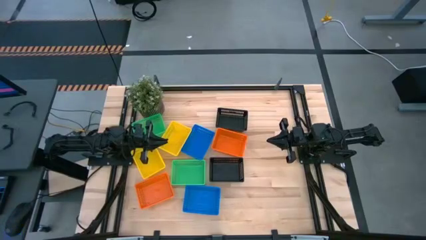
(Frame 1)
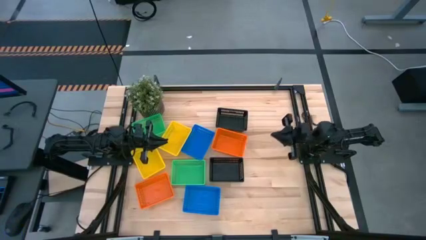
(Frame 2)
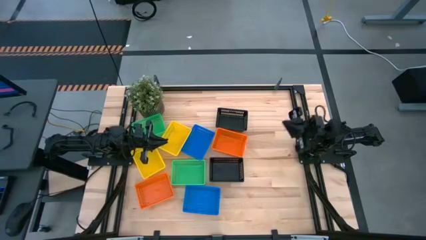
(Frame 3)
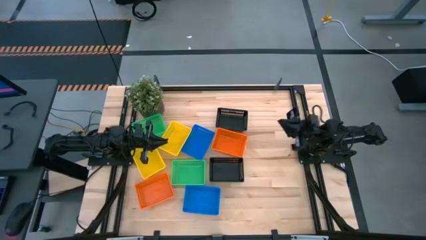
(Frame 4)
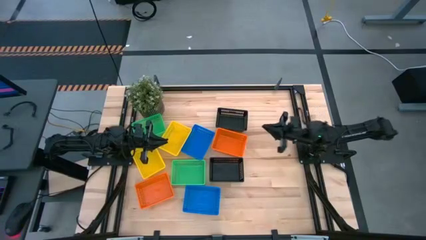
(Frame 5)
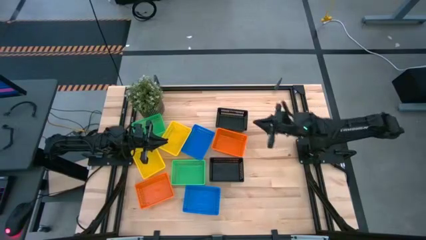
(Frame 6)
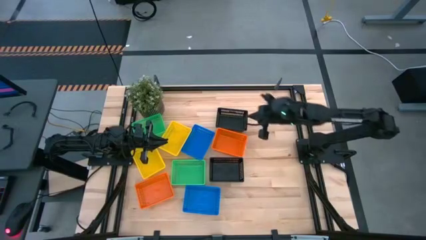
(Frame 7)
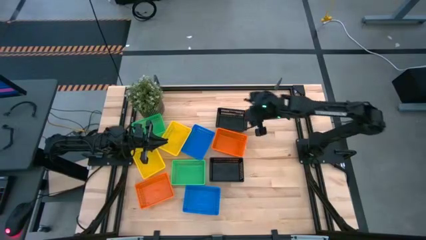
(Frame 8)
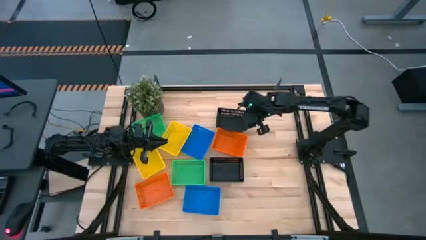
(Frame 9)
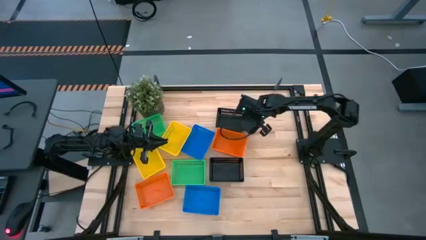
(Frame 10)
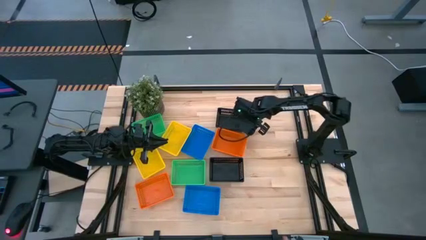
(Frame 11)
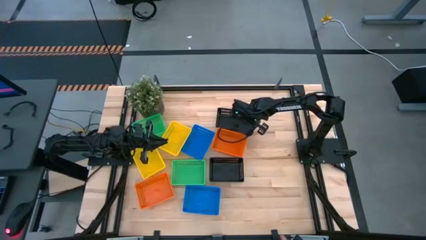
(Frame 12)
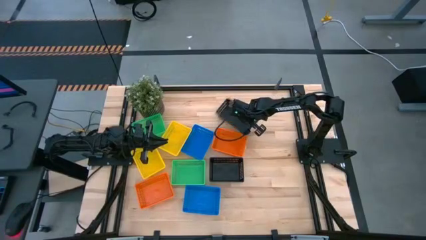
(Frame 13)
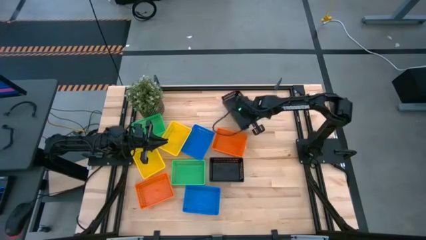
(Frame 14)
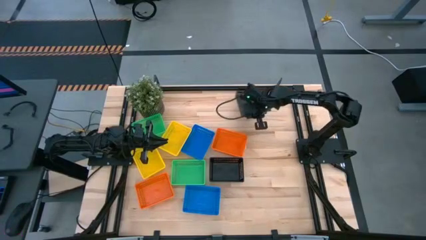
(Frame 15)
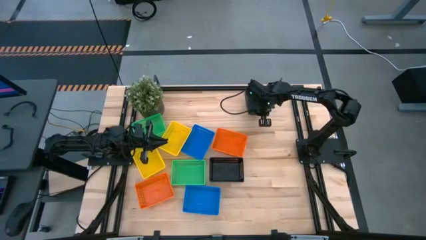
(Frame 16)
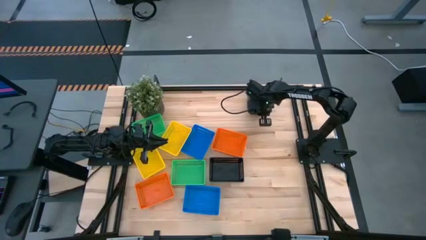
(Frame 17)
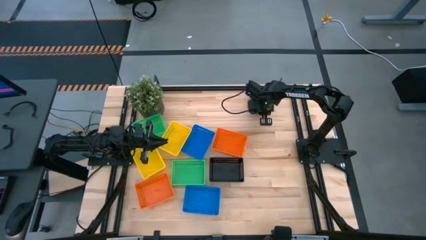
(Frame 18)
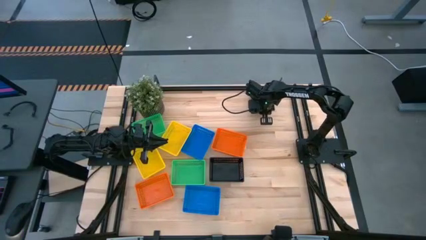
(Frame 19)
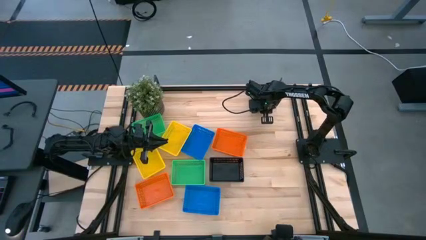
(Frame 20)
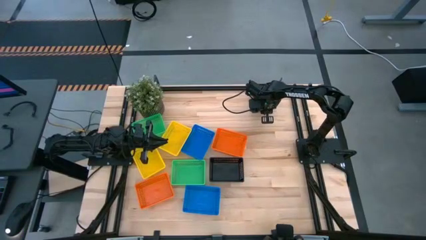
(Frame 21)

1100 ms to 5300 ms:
Move the top black bin to the top right of the table

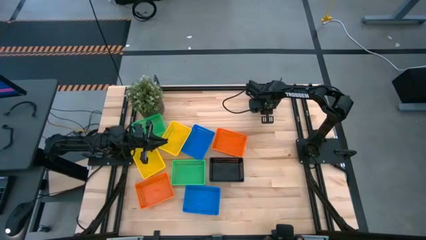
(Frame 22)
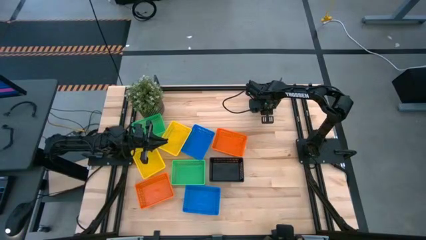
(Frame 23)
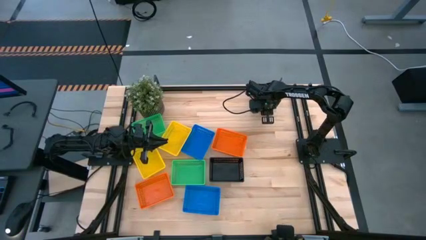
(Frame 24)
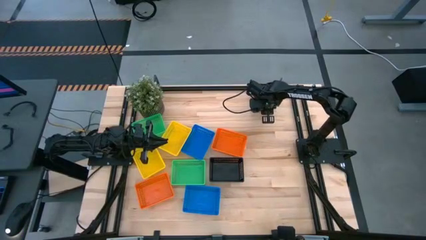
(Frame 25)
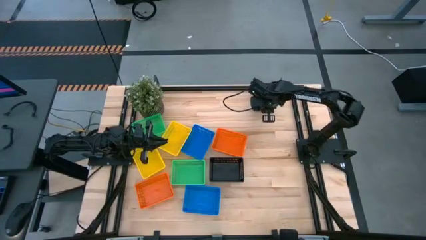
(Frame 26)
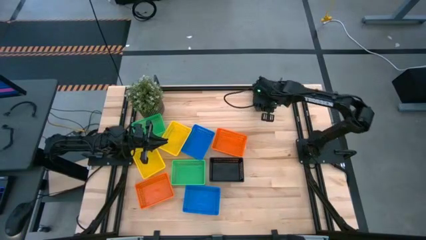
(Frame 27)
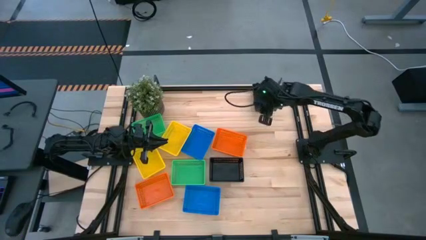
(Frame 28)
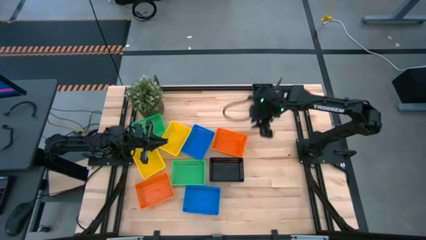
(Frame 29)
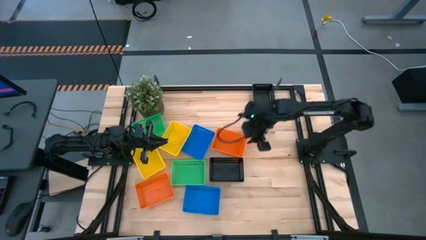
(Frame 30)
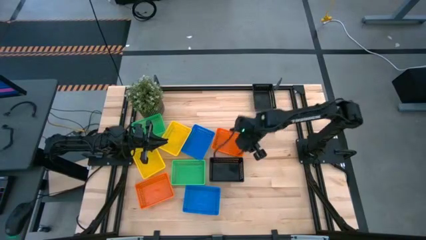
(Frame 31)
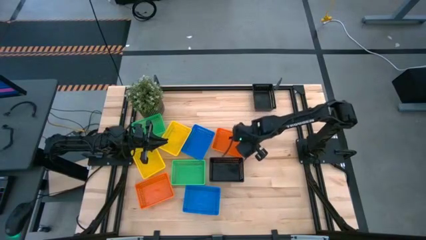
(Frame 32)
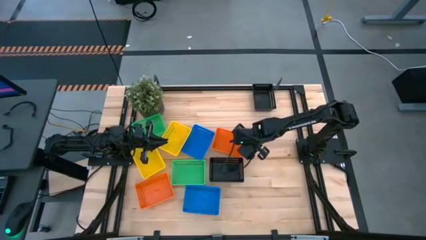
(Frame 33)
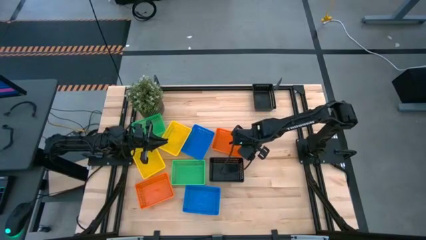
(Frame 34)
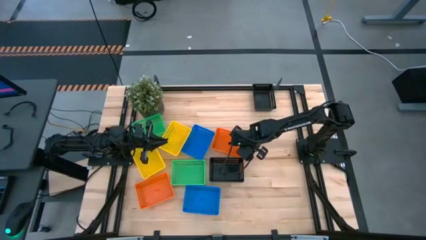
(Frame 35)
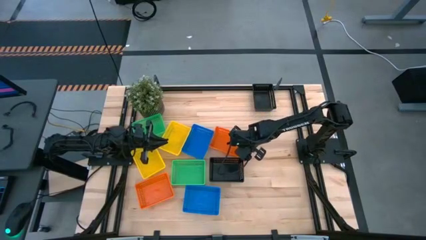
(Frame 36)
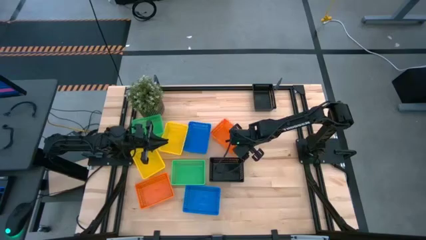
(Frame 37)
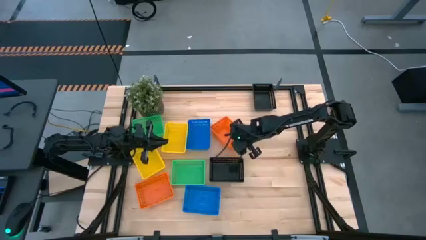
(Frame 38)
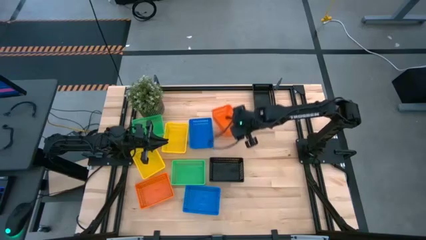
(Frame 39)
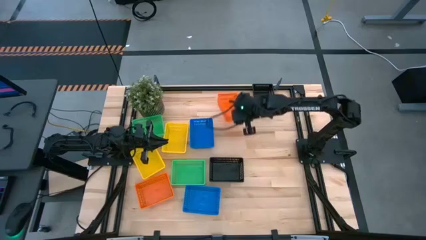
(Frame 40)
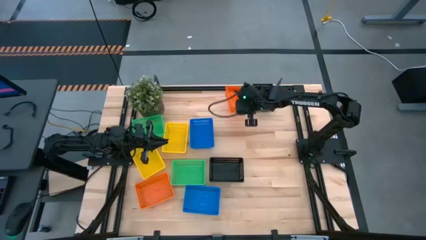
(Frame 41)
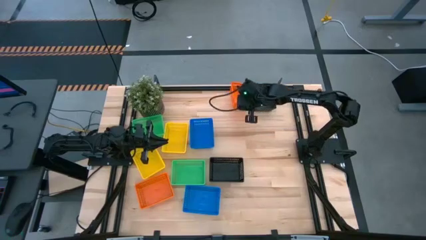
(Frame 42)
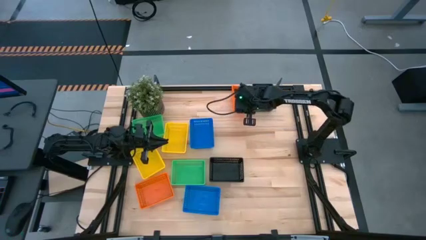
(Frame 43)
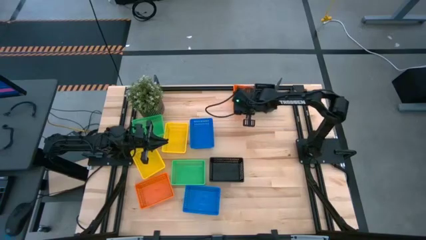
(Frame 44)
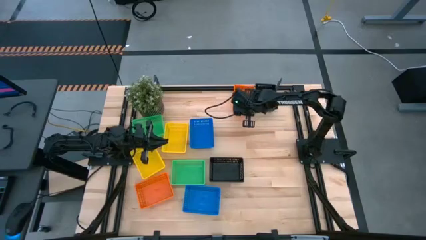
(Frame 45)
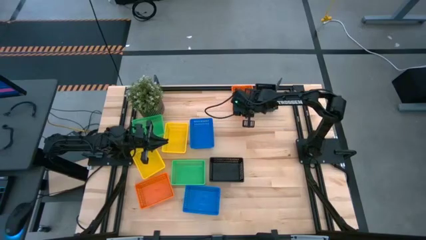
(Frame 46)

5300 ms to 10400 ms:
Move the top orange bin to the top of the table to the right of the black bin

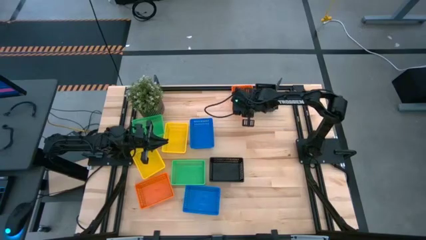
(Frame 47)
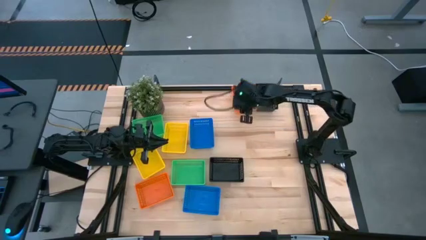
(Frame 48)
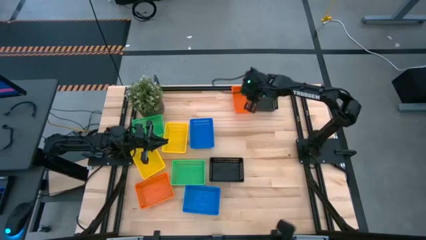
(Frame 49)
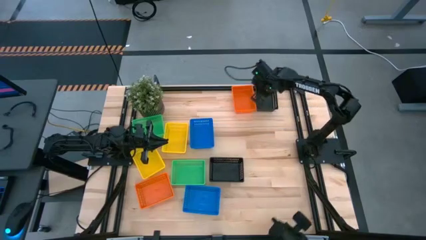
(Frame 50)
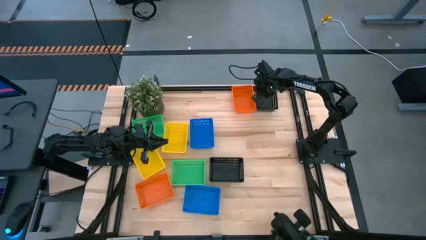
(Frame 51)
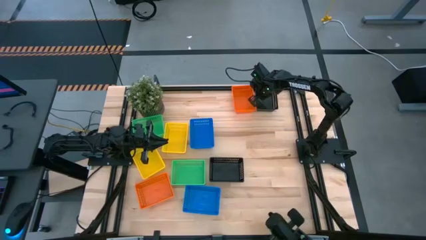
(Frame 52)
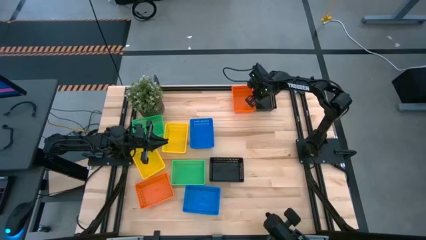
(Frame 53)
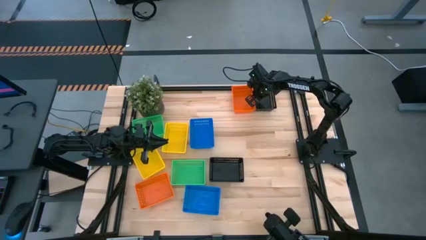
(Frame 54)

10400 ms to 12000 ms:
Adjust the black bin

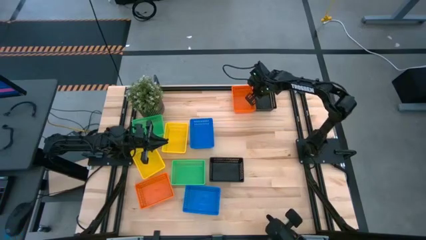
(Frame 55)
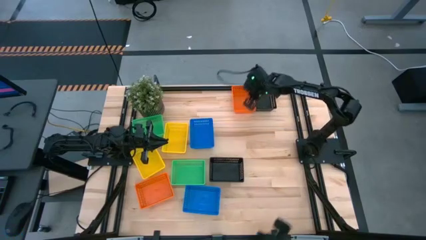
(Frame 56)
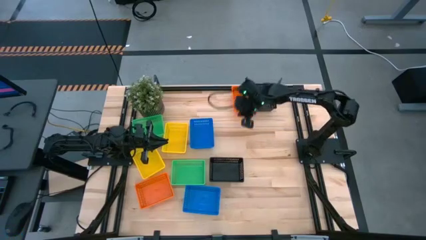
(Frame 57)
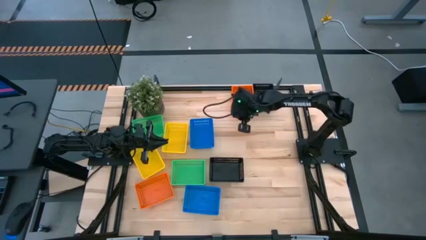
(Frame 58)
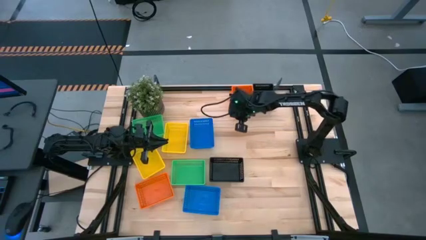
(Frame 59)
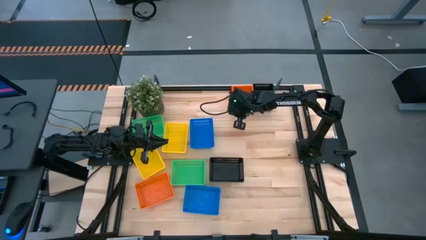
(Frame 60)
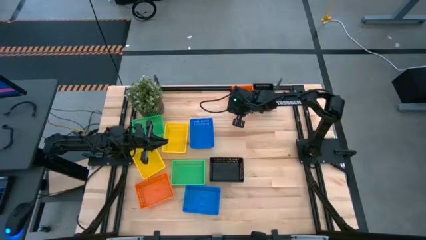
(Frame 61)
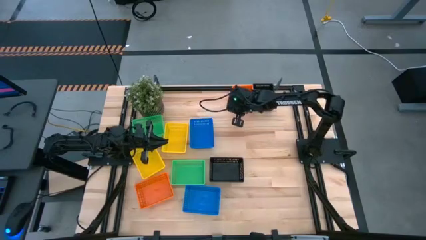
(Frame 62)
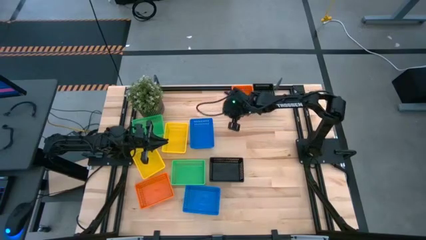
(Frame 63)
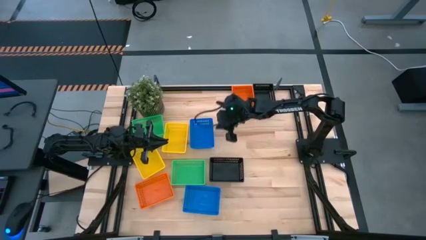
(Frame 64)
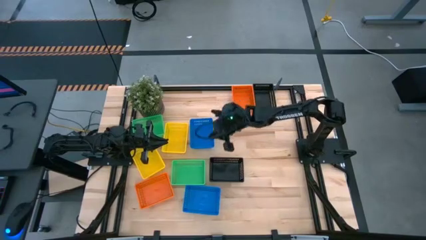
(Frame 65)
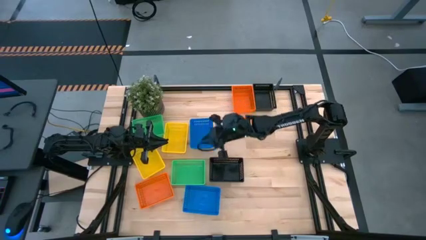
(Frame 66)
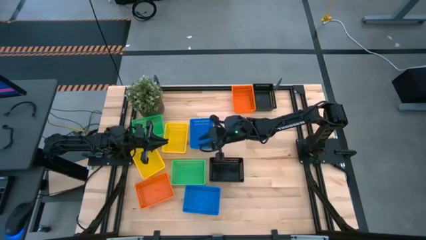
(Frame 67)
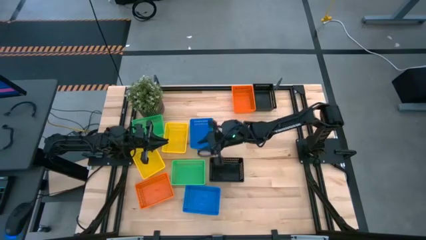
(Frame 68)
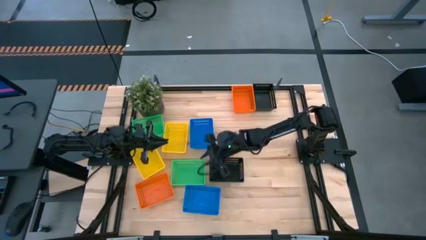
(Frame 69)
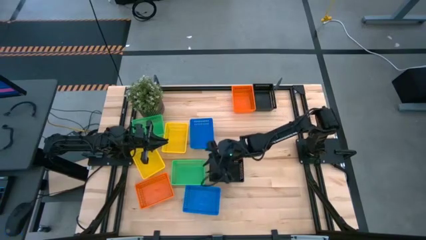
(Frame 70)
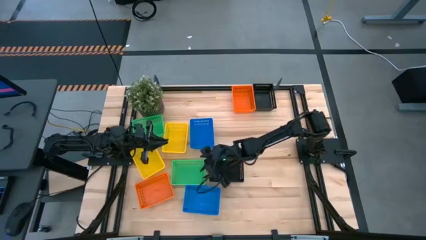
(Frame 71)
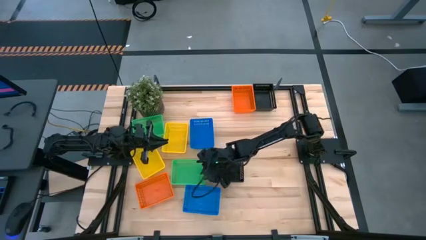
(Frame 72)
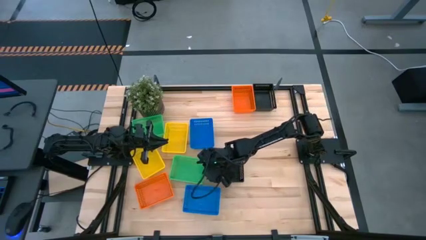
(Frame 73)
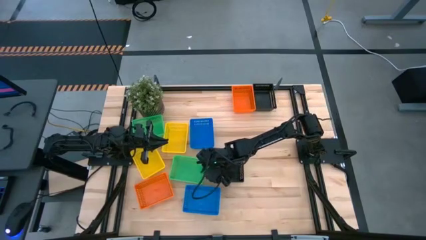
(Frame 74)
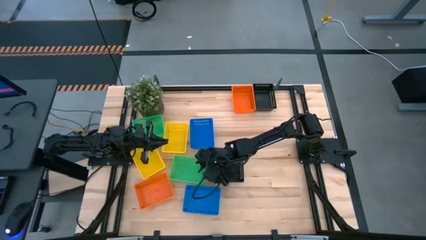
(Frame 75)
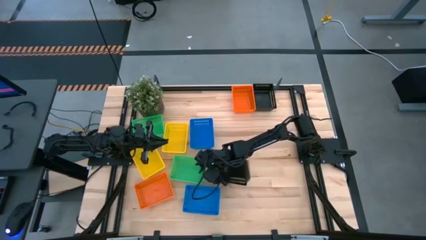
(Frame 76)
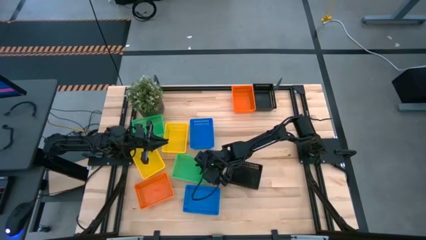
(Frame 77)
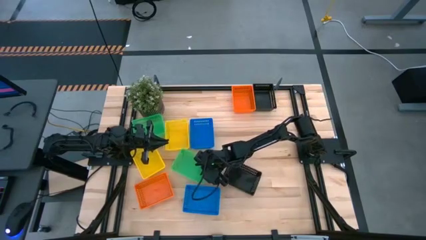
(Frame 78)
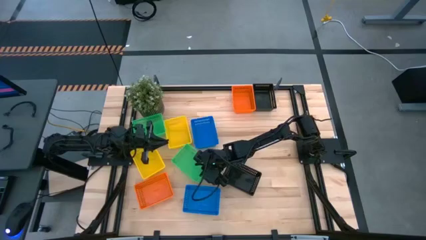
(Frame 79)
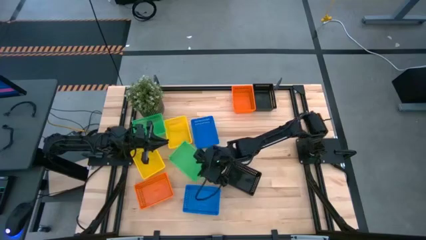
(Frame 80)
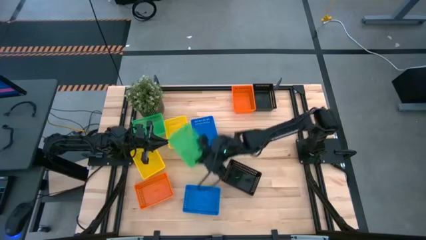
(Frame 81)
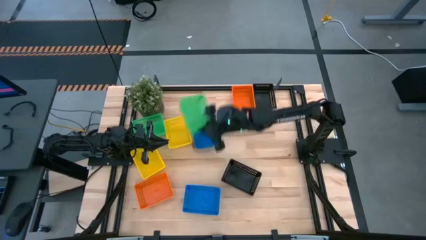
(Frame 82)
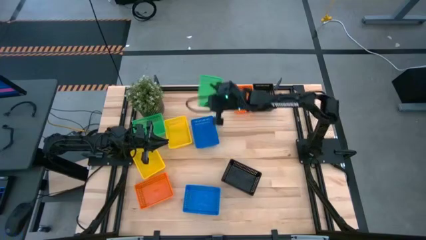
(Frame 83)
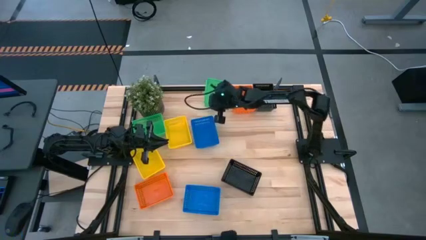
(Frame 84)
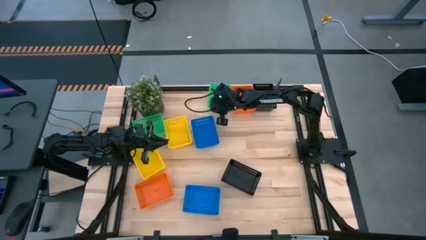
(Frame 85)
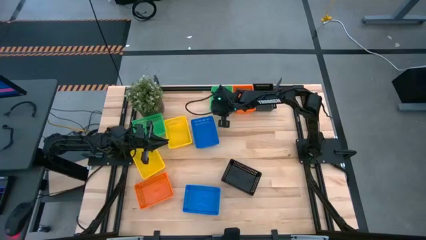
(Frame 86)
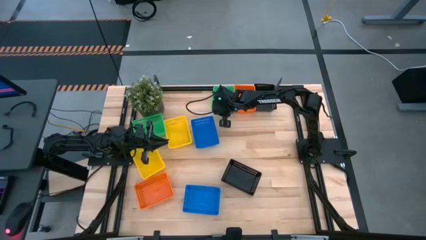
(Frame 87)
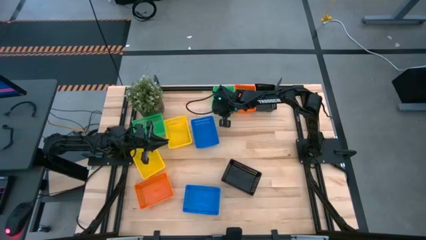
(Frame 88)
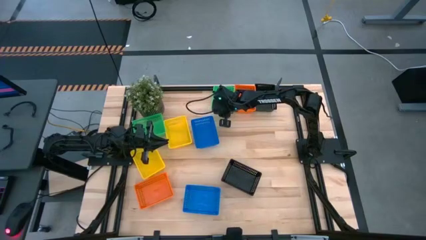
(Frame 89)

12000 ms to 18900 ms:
Move the bottom green bin to the top of the table to the right of the orange bin

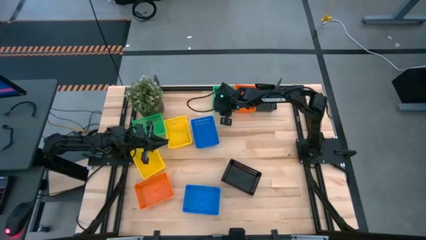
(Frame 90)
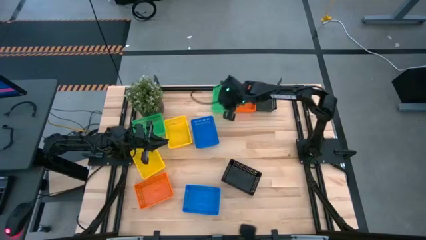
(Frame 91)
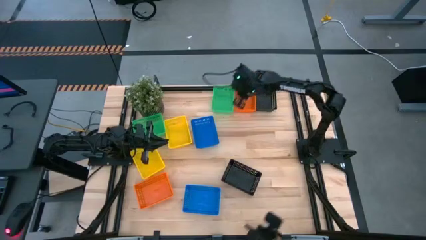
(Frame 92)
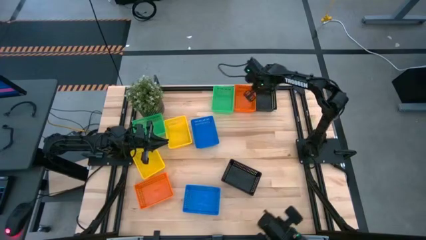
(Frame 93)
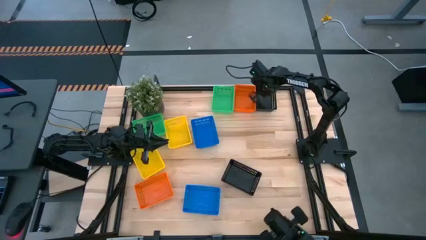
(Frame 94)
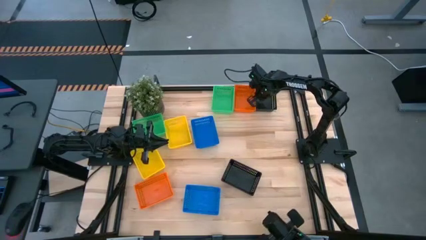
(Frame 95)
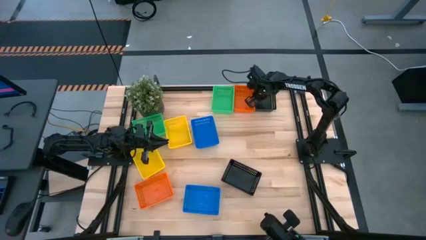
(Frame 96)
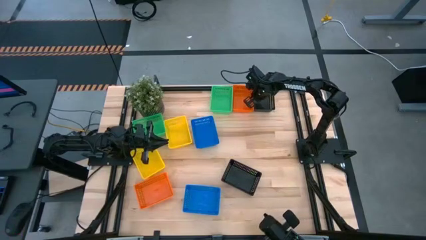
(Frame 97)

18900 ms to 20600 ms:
Adjust the bins
